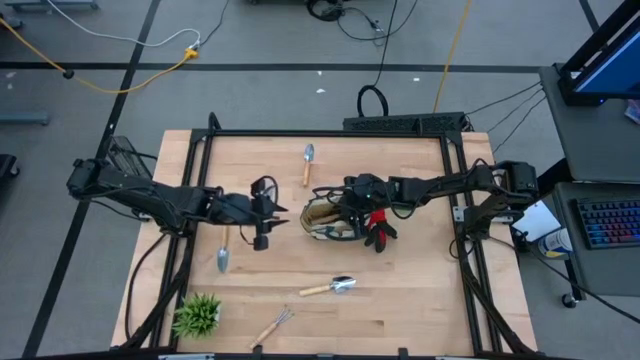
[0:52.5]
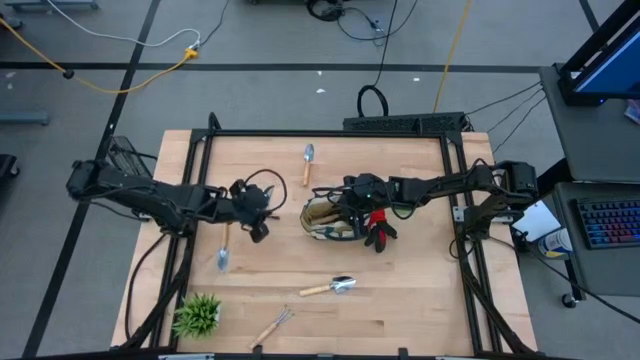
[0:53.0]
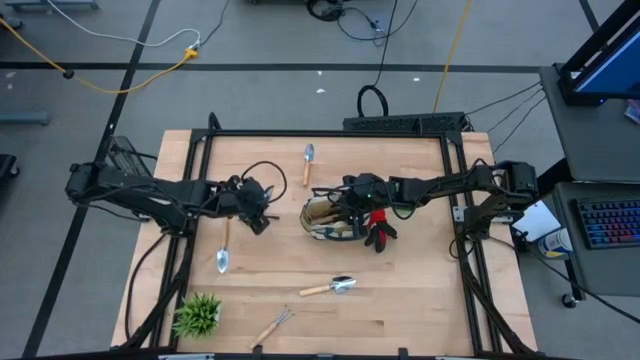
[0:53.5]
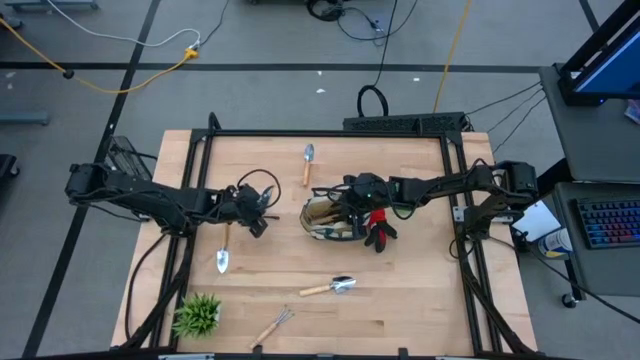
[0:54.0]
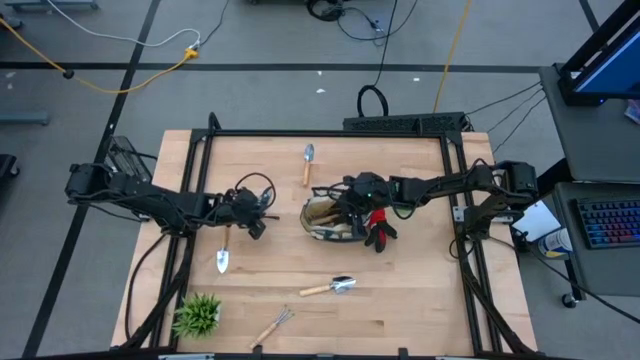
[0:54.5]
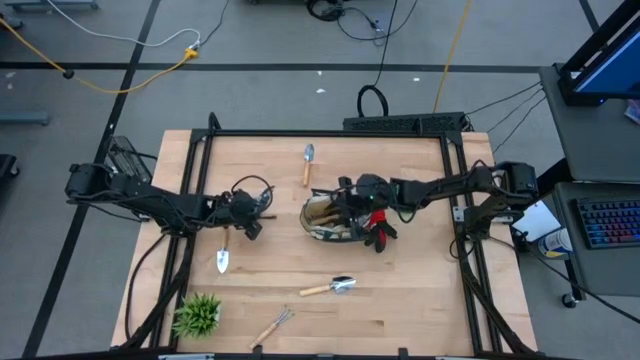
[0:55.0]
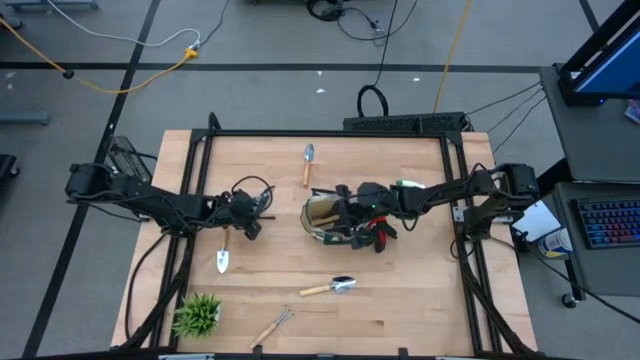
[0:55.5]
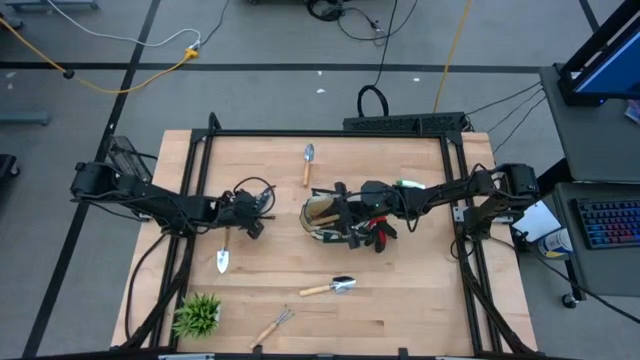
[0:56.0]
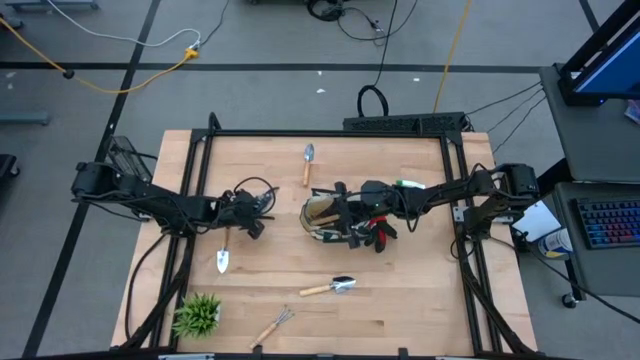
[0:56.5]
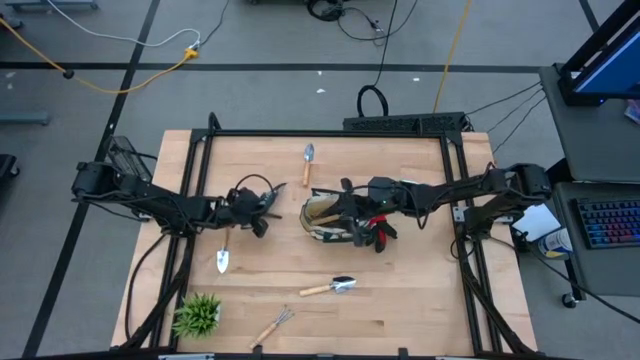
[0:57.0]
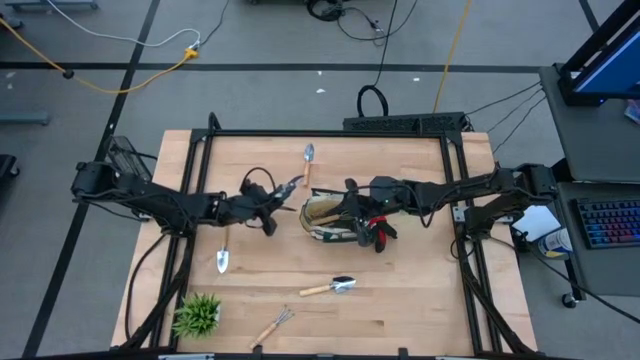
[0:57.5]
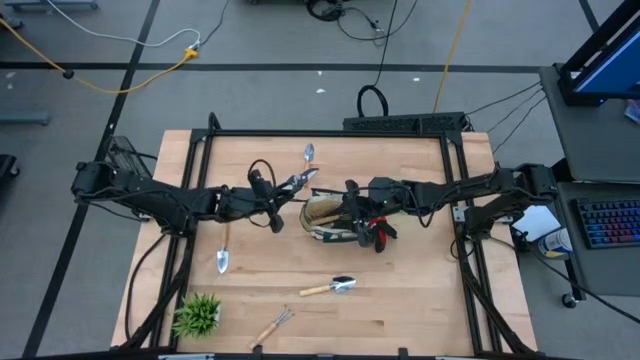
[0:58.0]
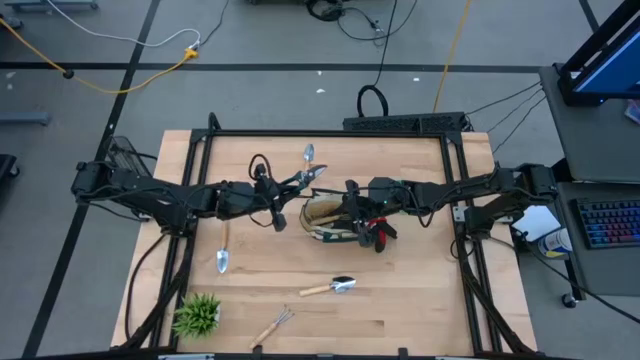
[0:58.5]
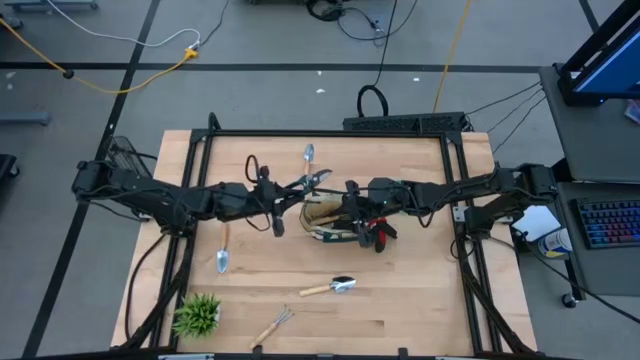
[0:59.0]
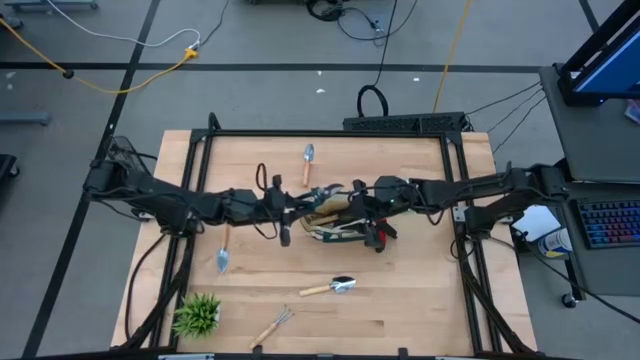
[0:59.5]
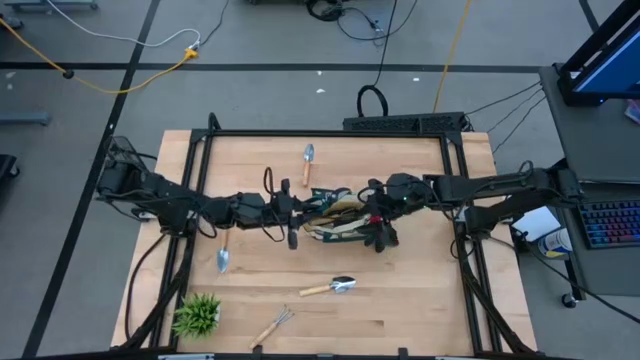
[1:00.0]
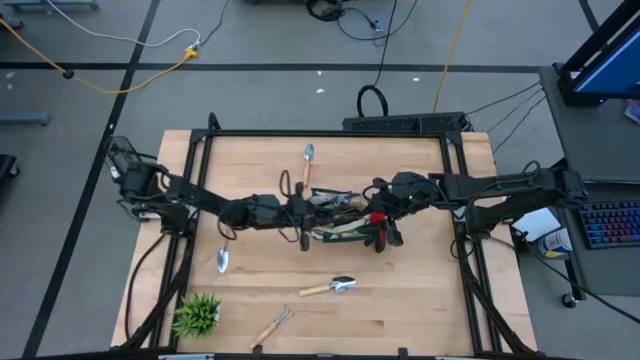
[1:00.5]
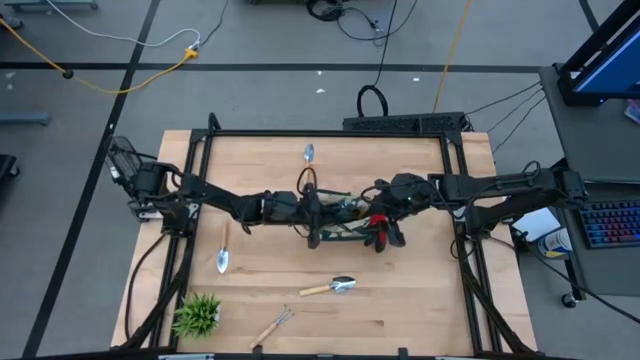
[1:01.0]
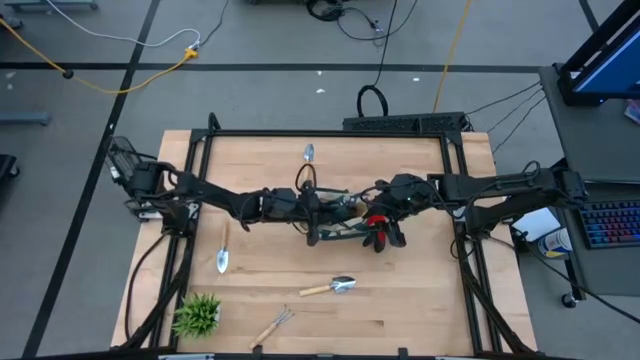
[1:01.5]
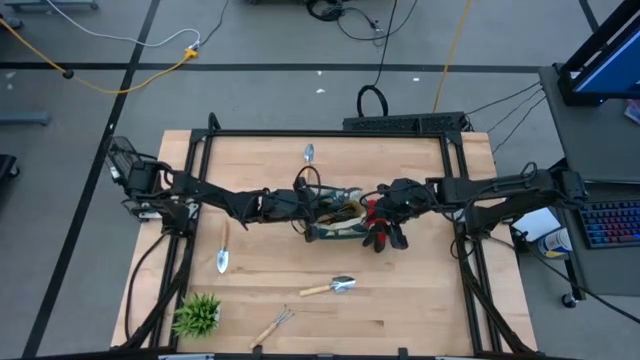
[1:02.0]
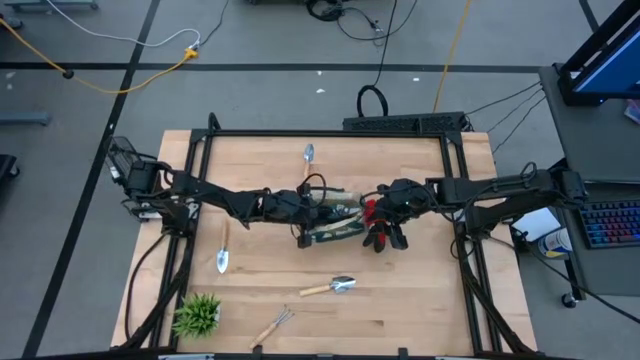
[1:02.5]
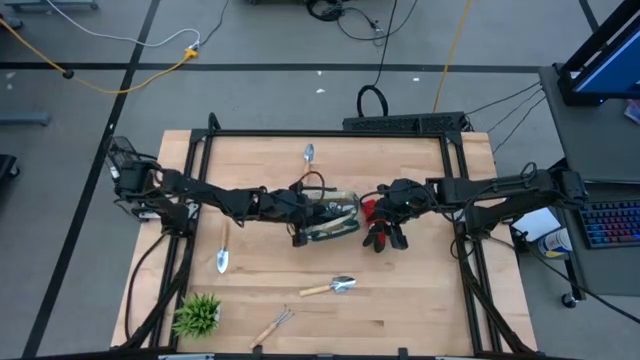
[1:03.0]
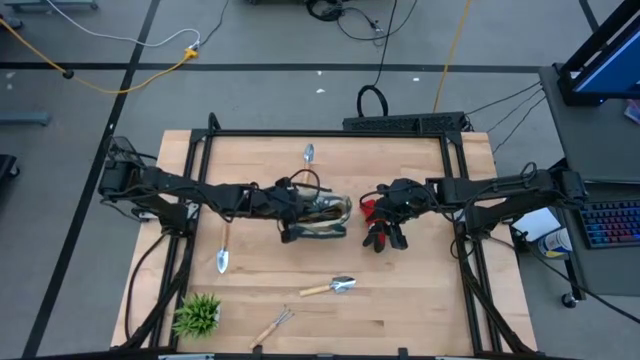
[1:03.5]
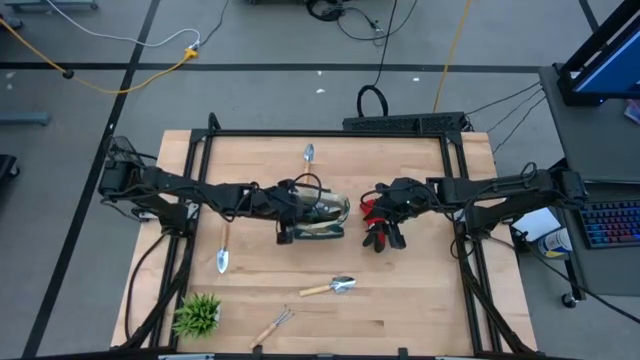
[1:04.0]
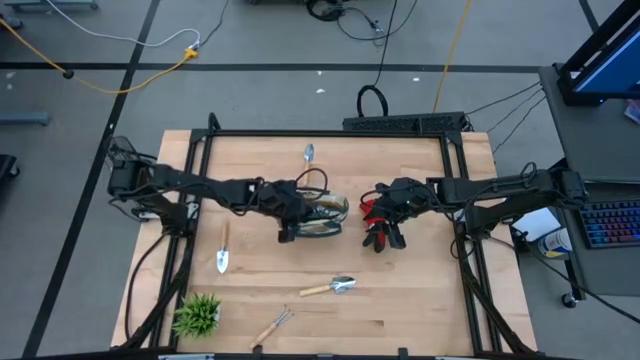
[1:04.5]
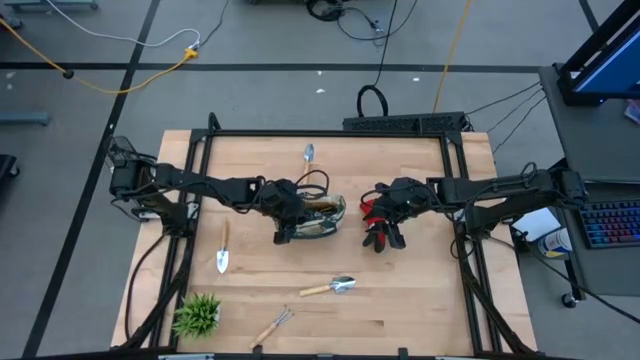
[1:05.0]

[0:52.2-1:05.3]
Task: Pick & Place Garden tools in Gardening bag
Put the brown shears into the green gardening bag

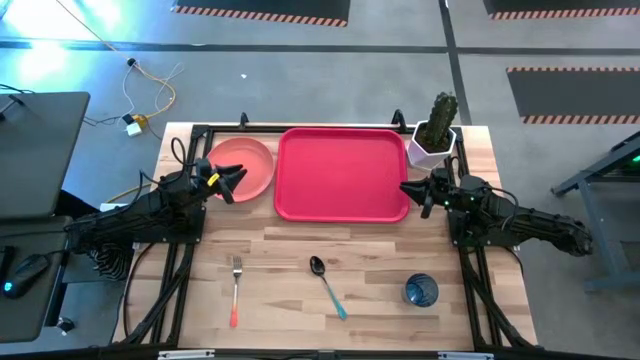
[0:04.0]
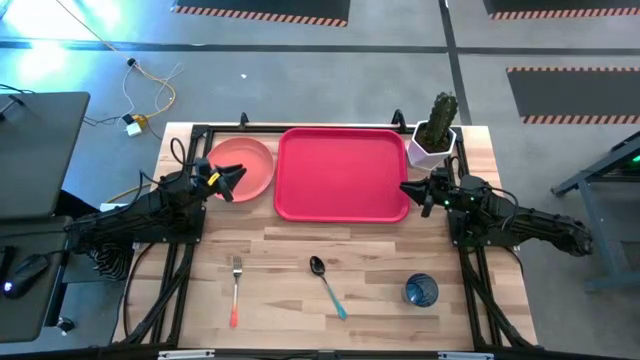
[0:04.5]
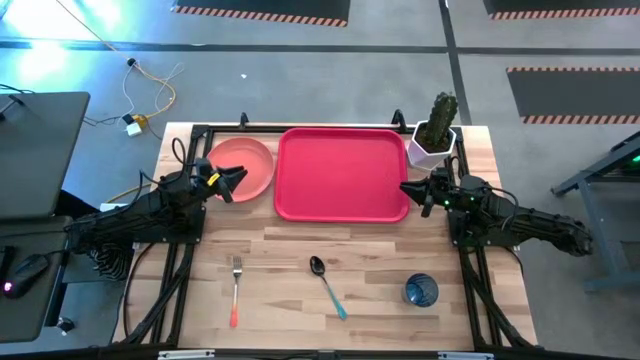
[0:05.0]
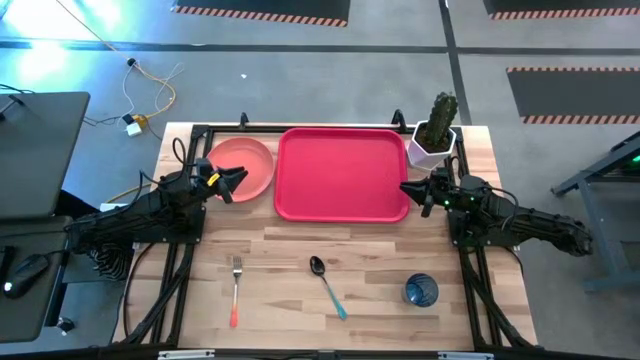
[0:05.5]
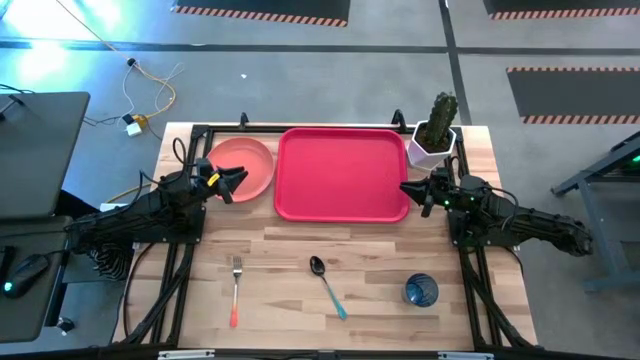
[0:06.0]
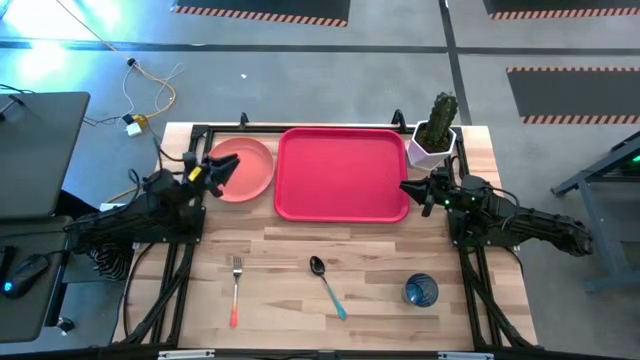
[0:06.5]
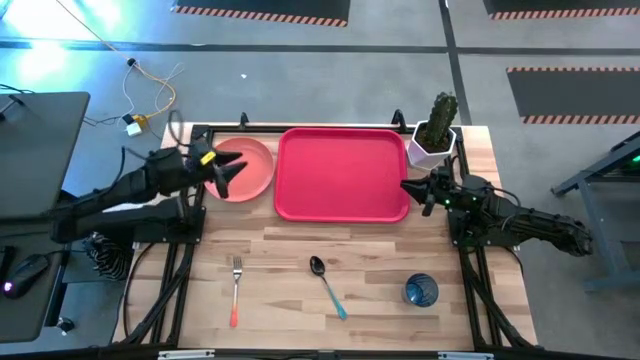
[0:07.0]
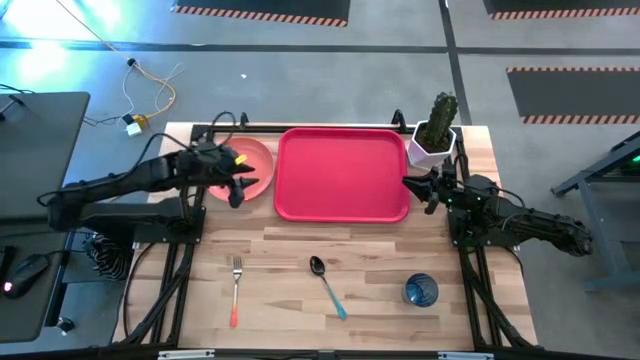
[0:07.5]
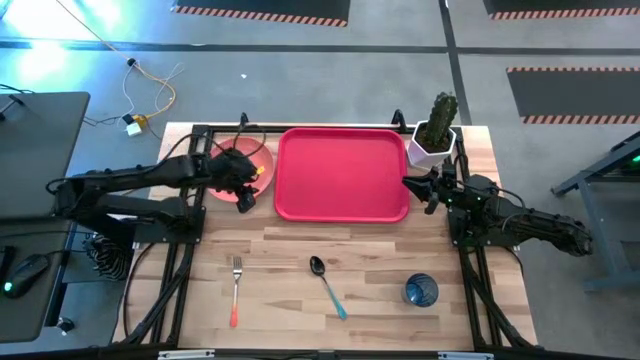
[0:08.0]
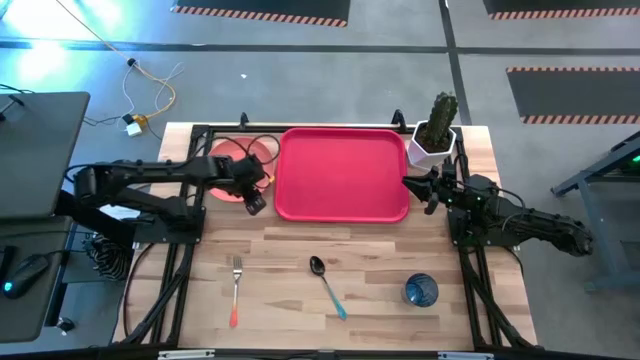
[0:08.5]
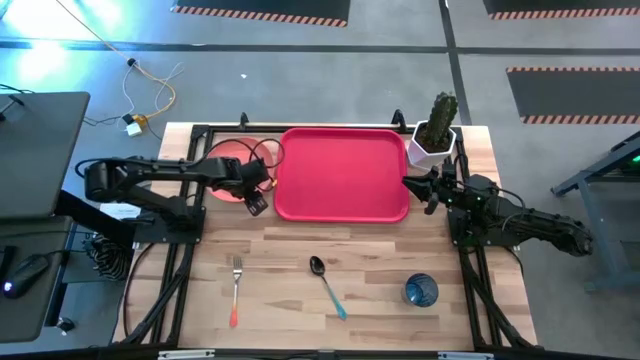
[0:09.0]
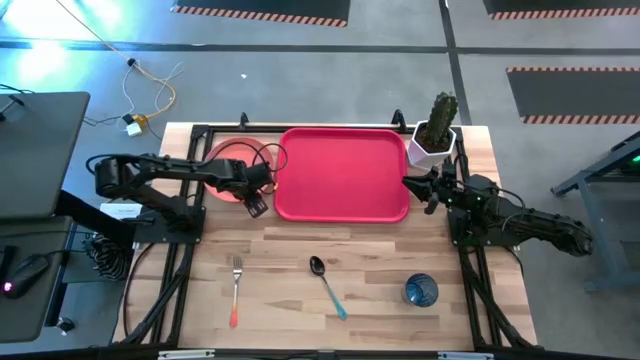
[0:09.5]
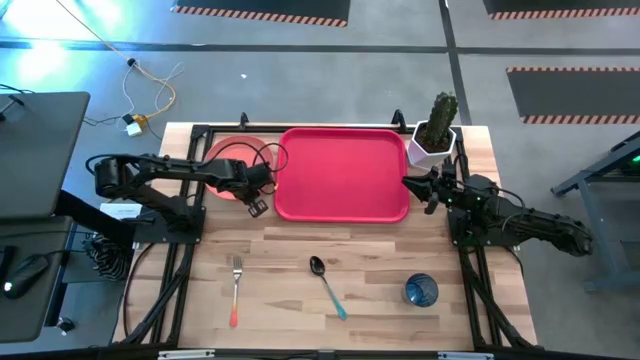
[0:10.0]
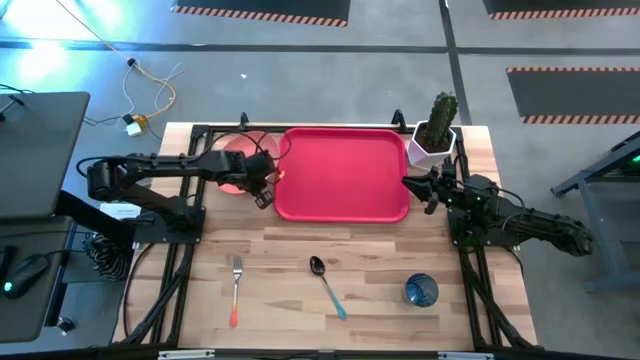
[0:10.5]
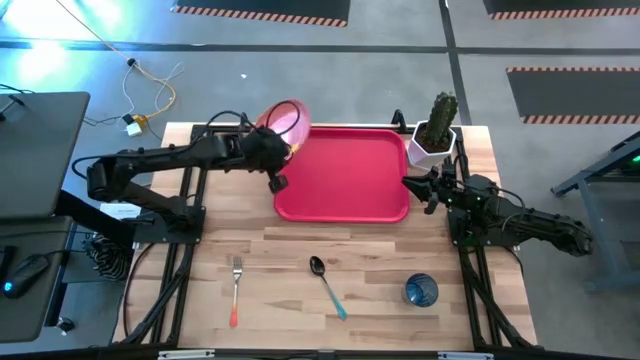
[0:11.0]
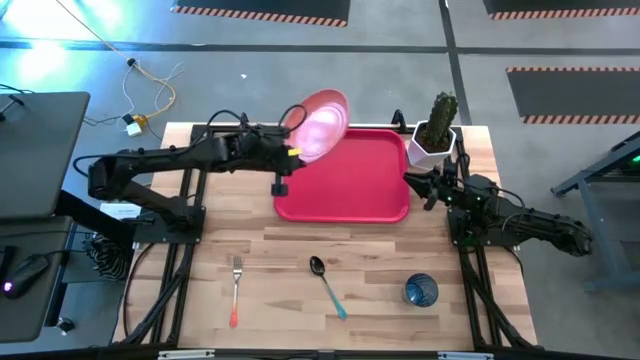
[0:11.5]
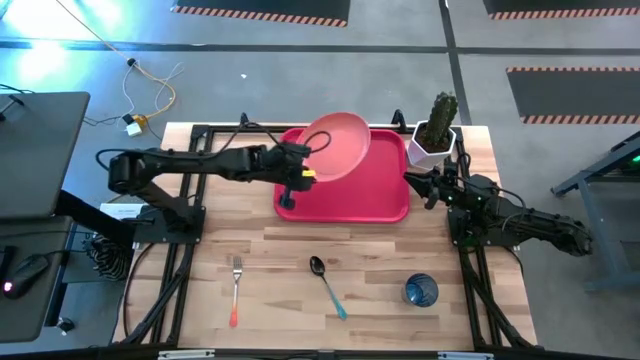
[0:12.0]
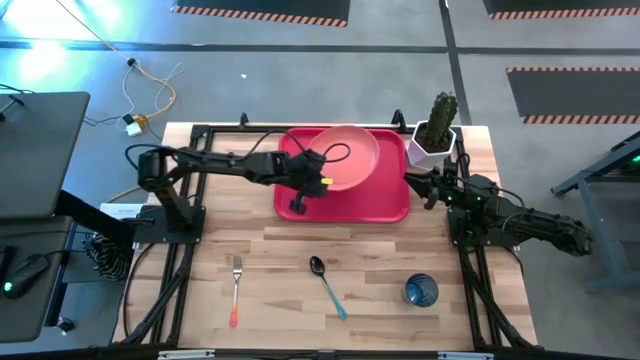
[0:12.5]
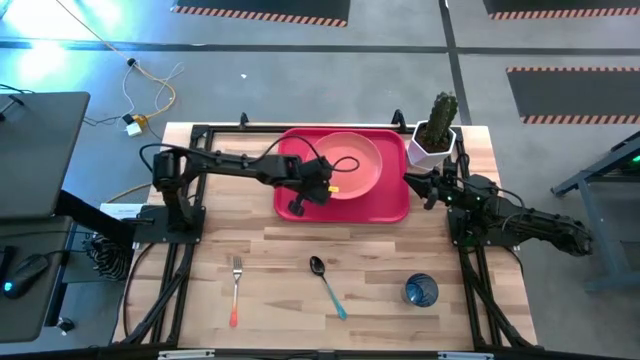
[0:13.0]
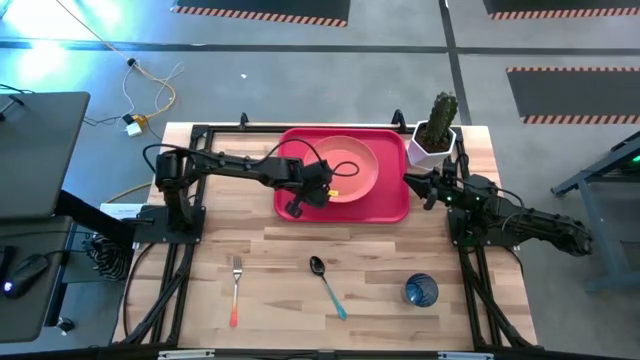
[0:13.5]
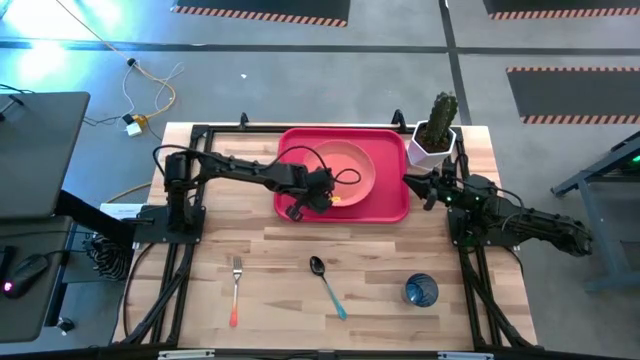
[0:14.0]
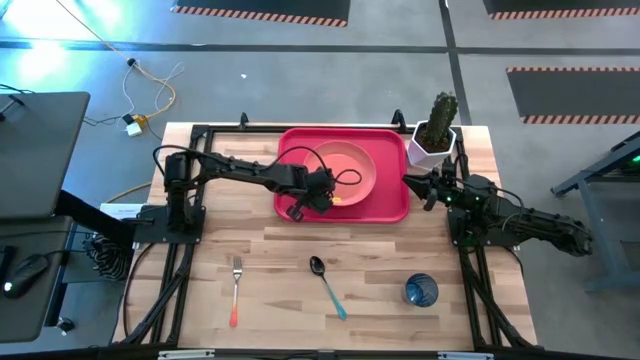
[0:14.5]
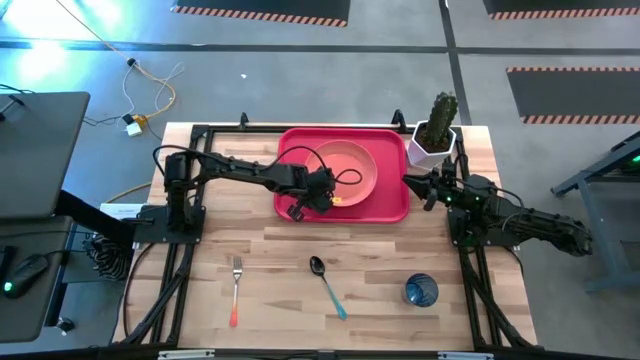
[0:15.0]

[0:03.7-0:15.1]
Task: Pick and place plate/cup/fork/spoon on tray
Put the orange plate on the orange tray
